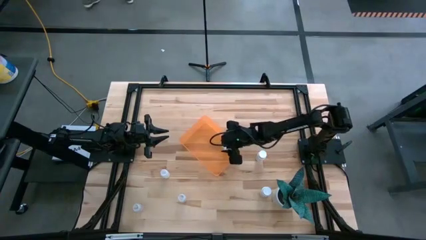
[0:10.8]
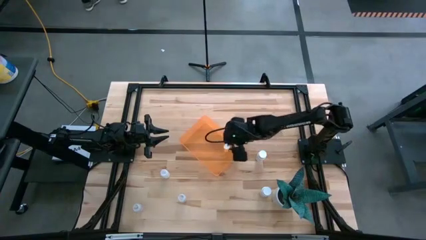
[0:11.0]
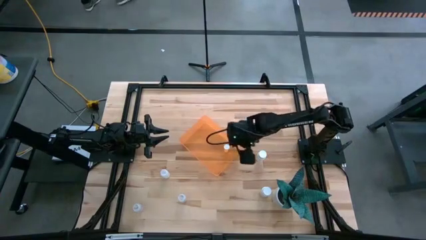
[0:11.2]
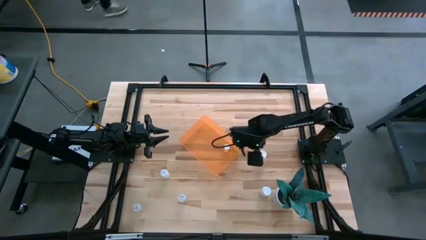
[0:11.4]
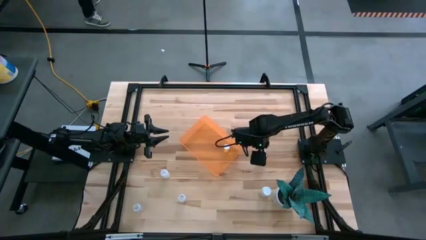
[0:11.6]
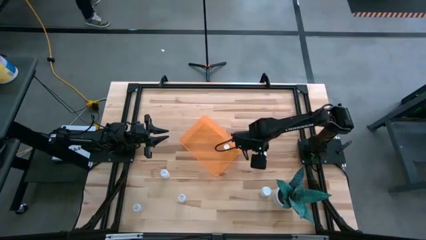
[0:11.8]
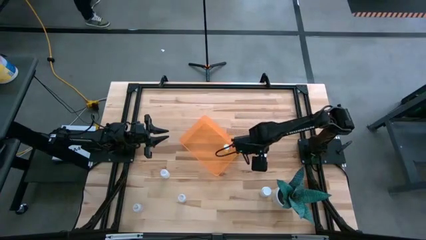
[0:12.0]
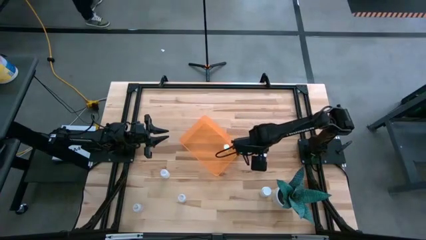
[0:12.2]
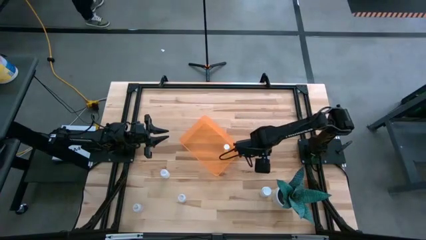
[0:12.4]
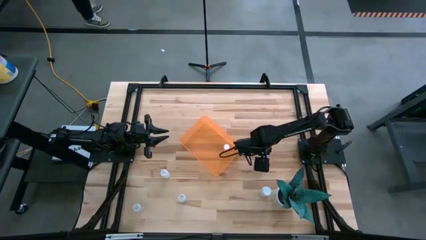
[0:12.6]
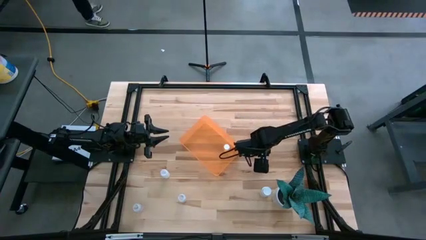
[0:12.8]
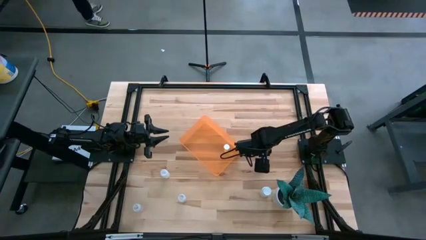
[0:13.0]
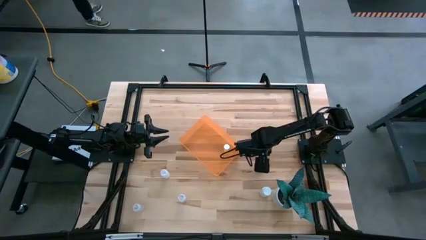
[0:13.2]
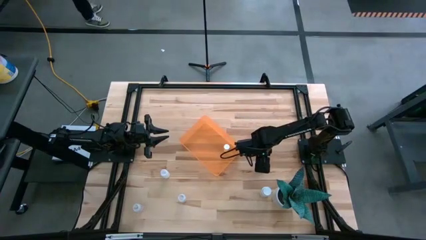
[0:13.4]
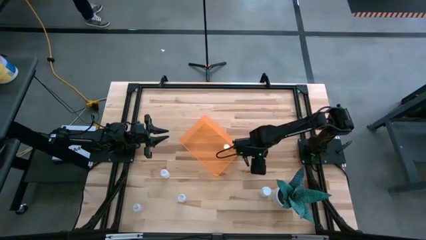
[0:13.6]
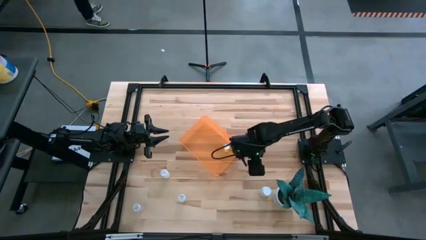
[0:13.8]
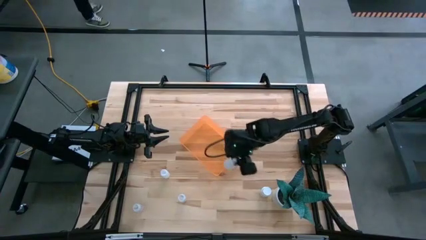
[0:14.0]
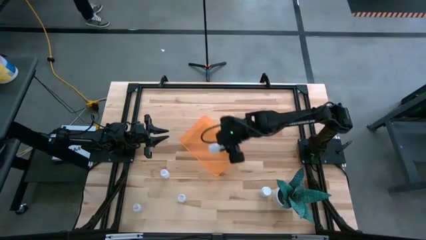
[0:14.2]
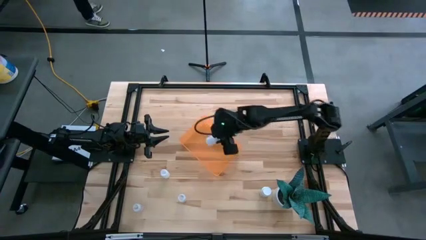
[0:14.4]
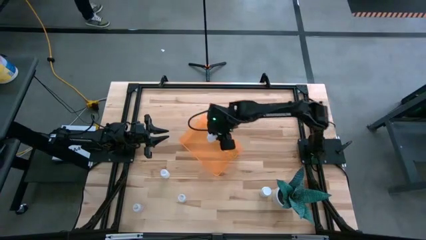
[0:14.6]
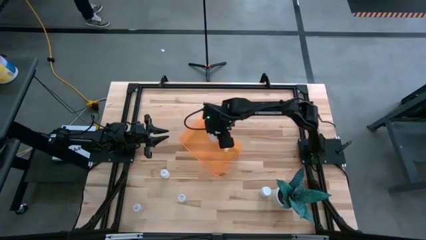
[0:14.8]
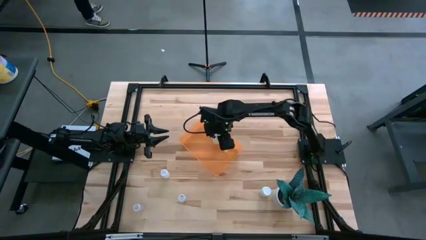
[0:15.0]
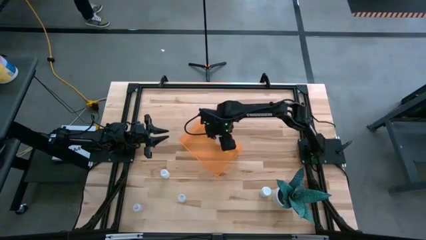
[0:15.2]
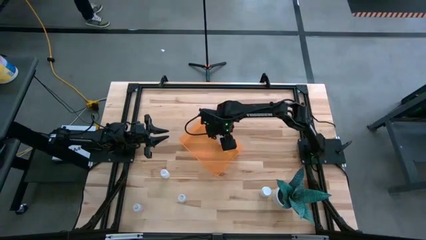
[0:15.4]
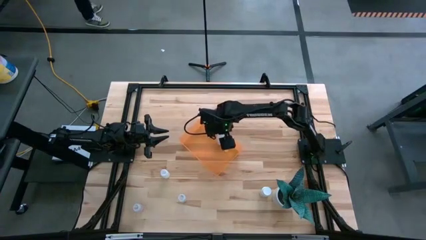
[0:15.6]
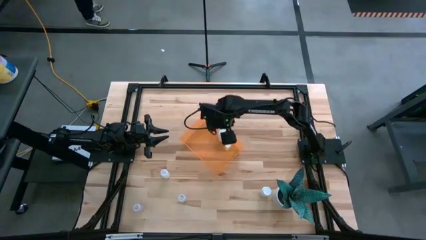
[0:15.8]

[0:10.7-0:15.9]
Task: Pick and place pill bottles into a basket
Put the top white pill bottle into the orange bin

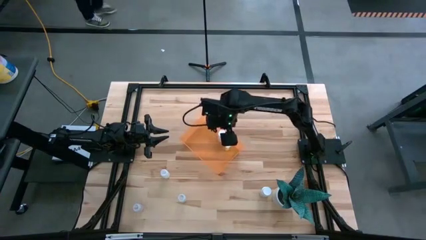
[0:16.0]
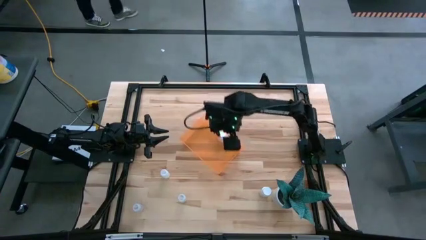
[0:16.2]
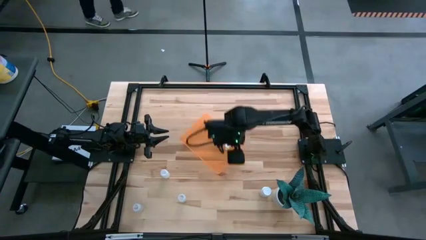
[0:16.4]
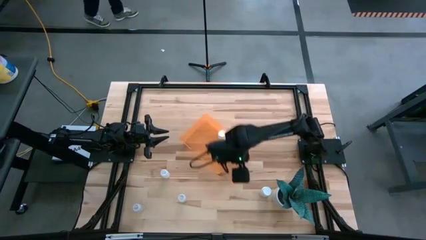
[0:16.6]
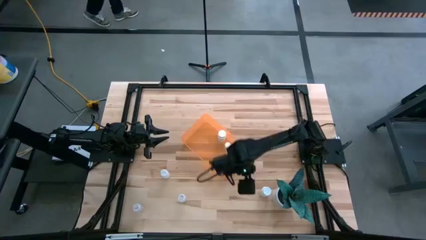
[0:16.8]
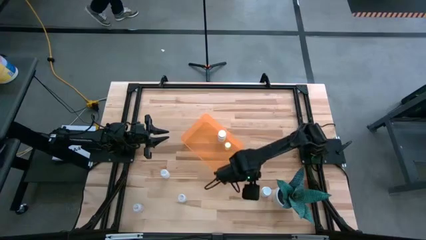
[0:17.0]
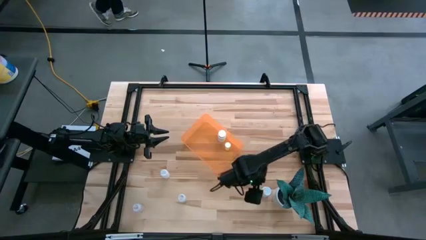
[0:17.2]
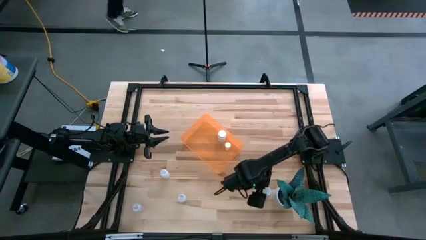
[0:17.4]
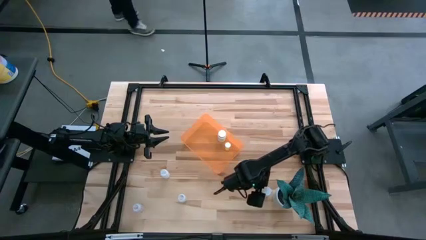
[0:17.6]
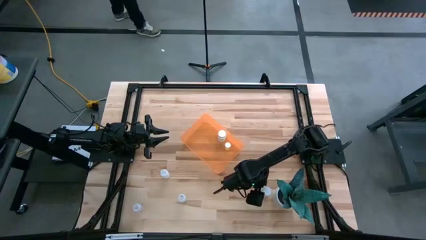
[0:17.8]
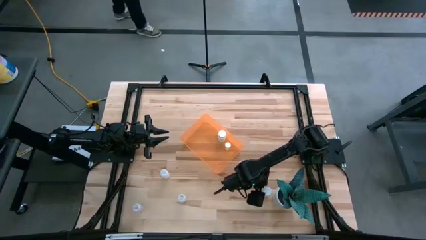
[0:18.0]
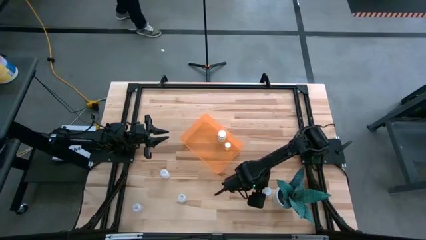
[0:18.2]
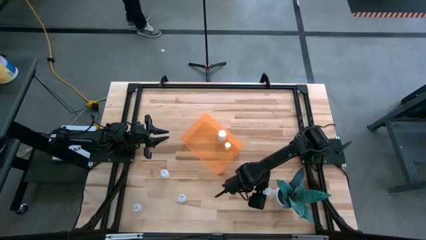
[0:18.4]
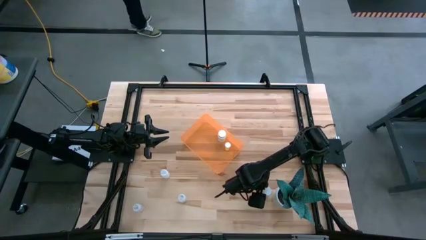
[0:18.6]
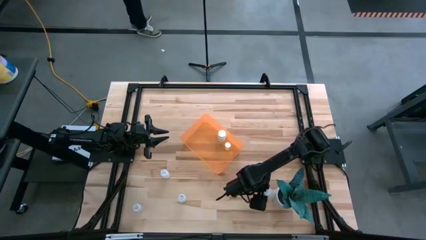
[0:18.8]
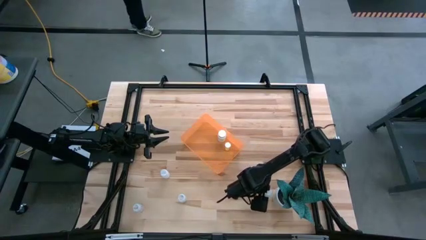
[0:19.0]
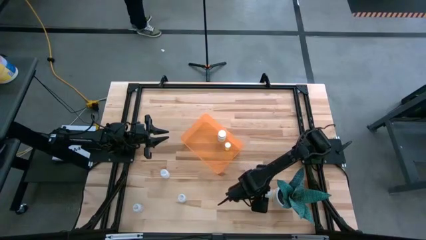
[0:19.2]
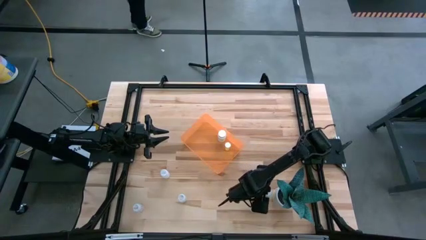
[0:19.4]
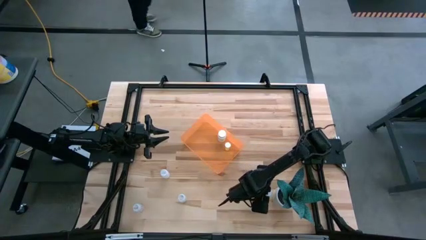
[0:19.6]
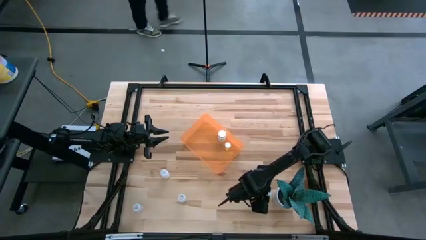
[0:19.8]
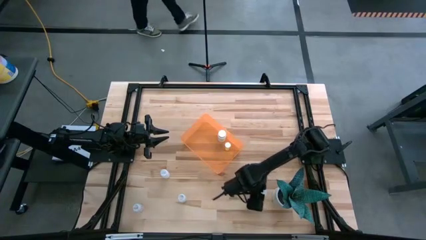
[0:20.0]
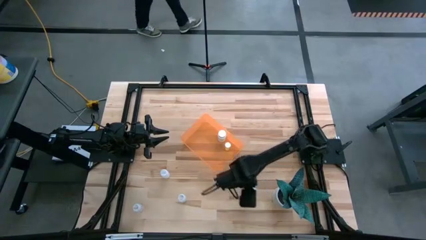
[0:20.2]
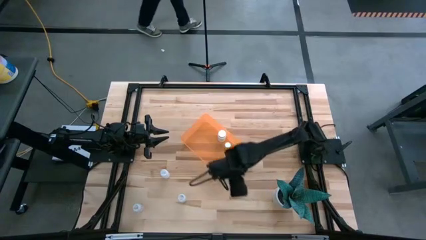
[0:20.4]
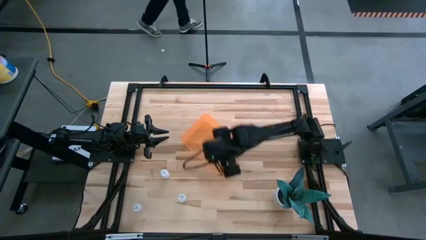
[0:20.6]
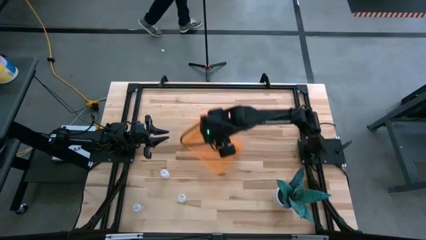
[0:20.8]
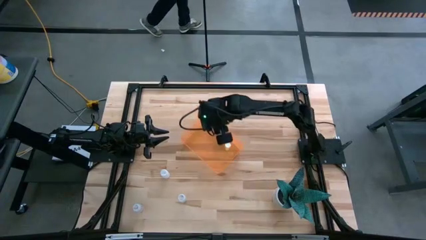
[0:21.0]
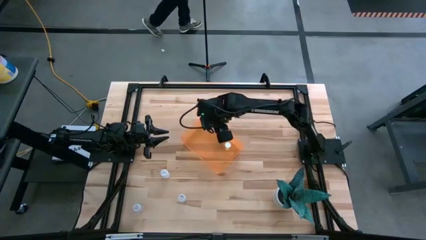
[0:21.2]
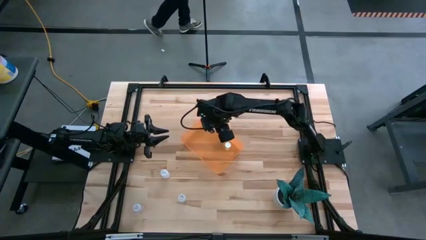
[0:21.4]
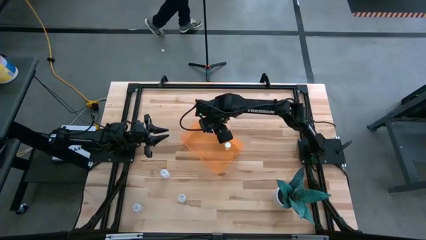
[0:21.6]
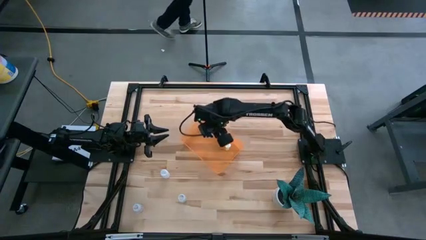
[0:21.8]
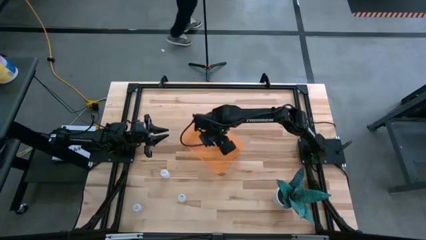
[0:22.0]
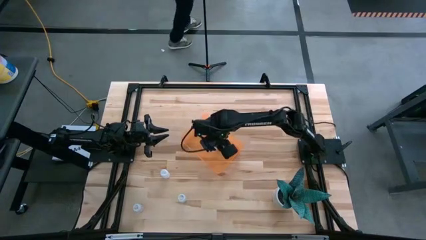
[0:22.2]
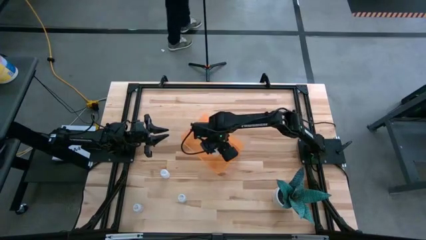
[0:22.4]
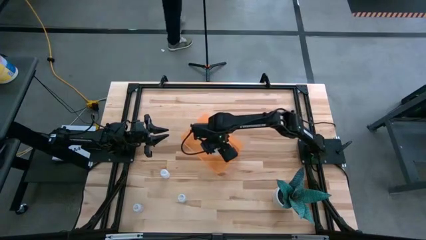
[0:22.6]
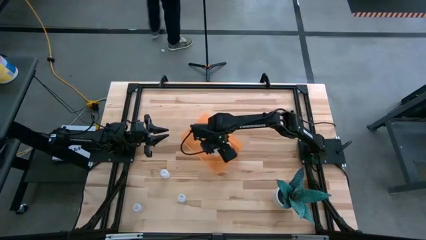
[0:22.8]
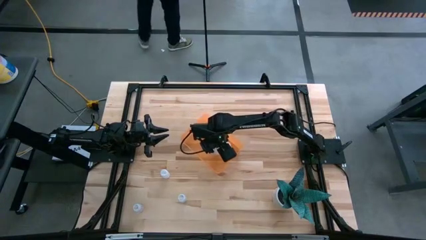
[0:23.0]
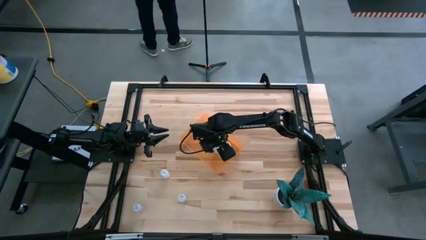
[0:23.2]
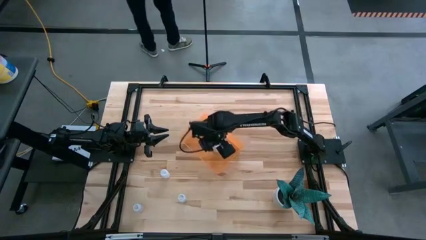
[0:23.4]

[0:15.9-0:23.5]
Put the bottom white pill bottle into the orange bin

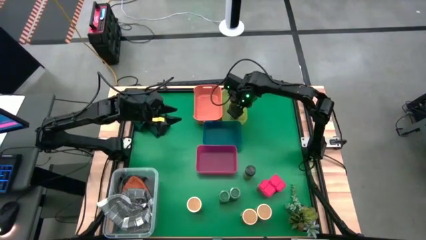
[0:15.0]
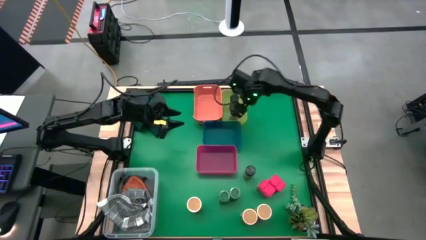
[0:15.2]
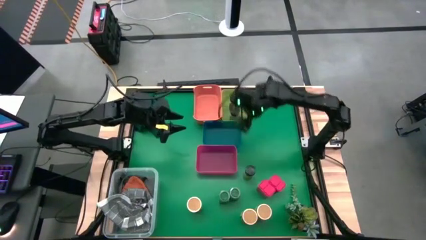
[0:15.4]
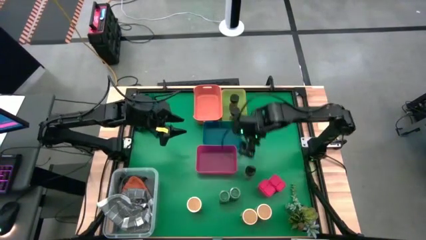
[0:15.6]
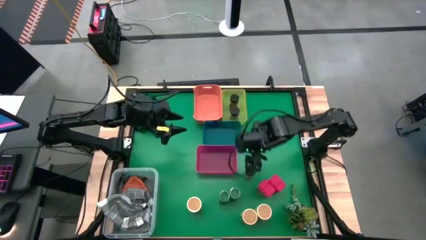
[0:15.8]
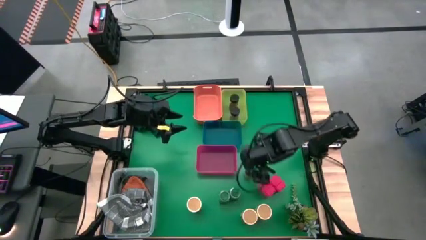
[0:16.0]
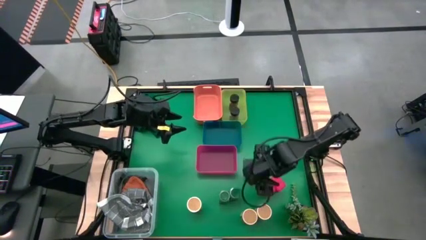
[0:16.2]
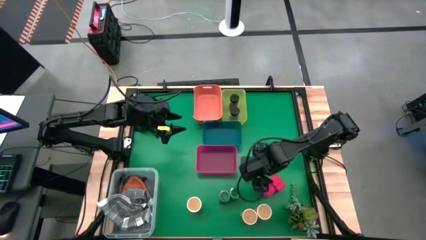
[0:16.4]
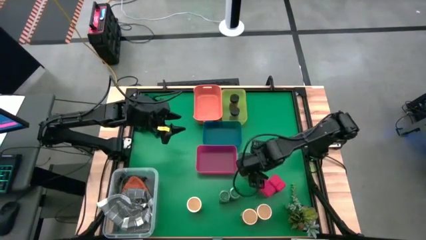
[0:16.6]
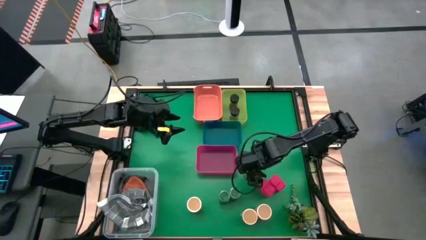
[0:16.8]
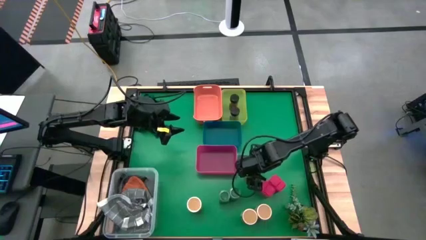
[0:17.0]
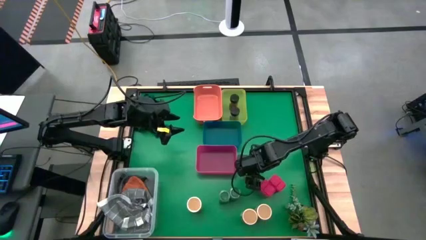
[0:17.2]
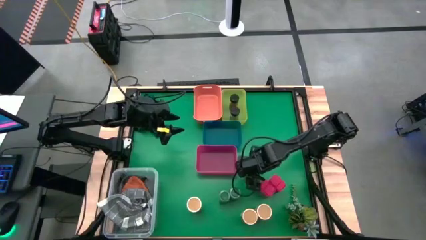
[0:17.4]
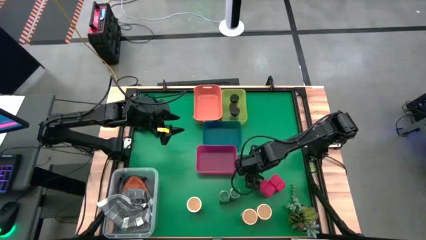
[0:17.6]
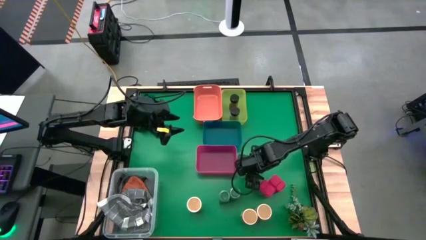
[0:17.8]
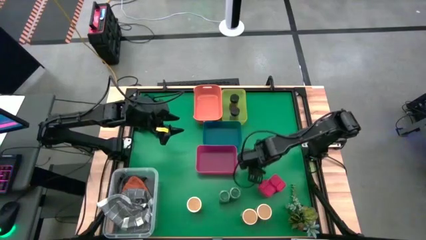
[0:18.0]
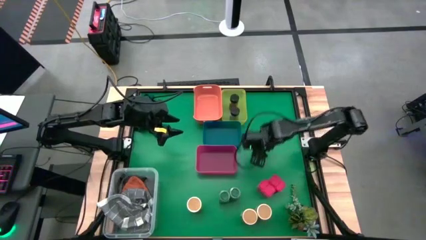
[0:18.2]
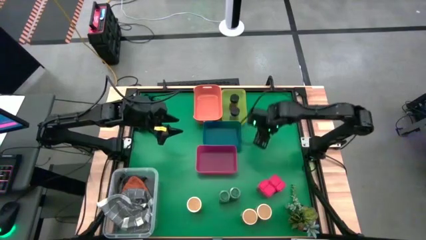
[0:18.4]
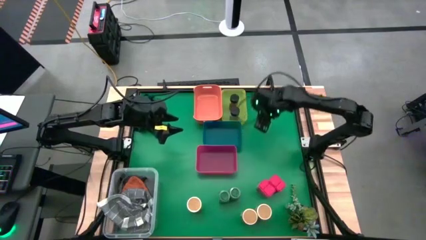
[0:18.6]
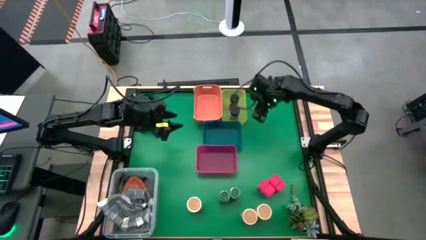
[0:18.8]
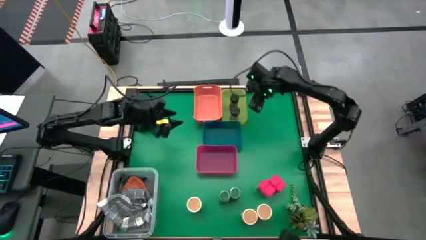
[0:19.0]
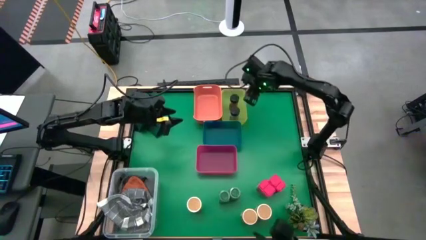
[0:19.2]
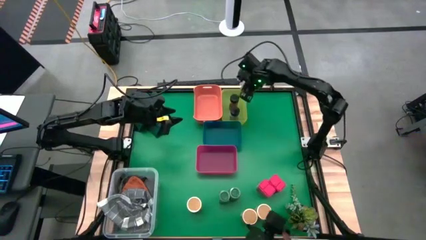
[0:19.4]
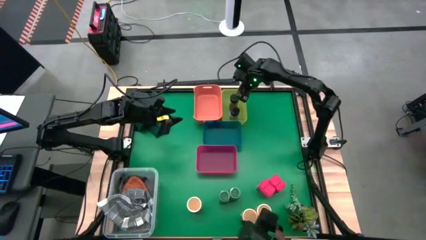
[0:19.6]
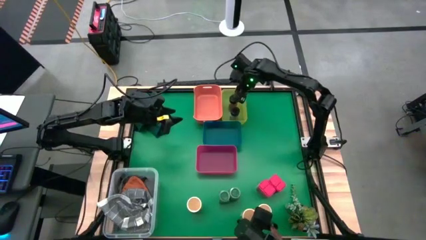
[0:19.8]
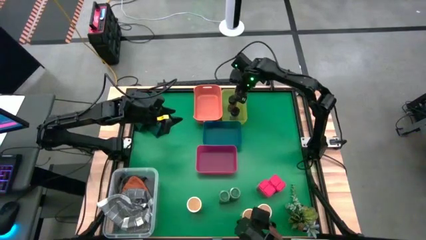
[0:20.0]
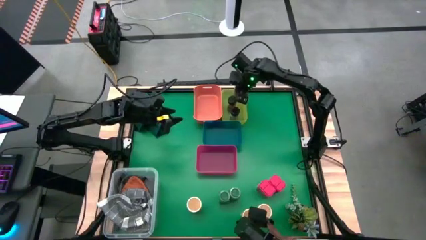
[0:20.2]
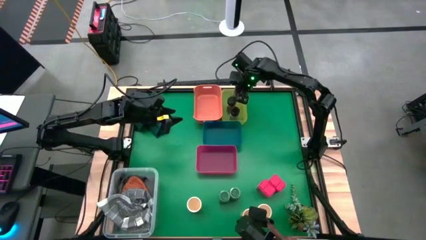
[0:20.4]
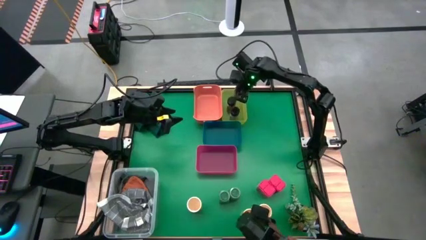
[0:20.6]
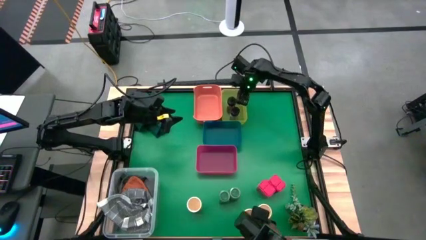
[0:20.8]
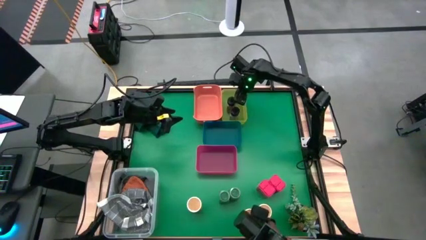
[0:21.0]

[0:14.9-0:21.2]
Task: Sort spices by type
Put the black seasoning bottle into the yellow bin
